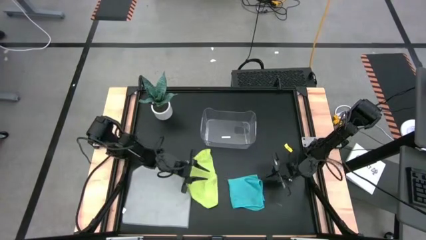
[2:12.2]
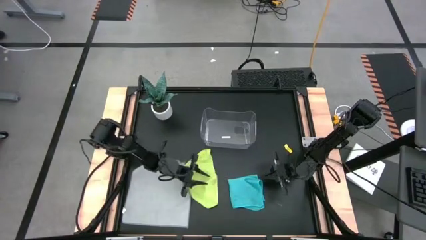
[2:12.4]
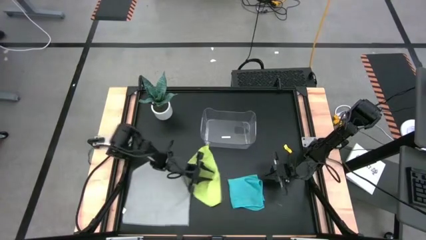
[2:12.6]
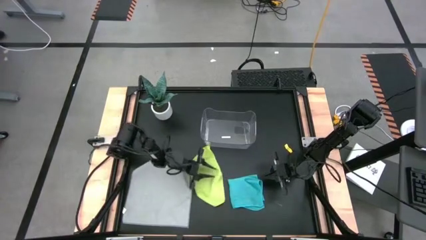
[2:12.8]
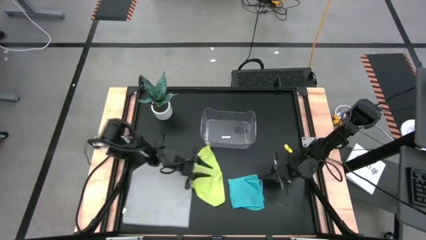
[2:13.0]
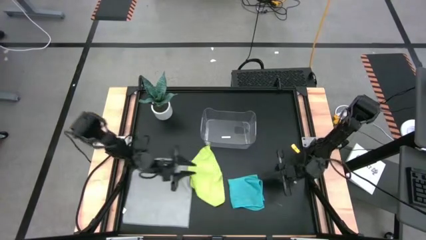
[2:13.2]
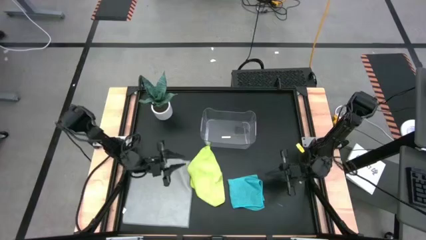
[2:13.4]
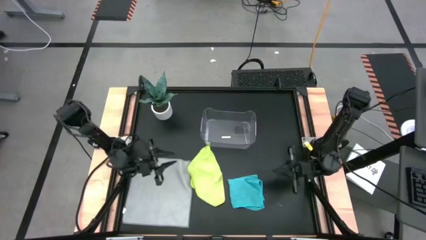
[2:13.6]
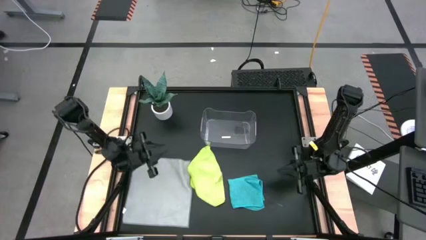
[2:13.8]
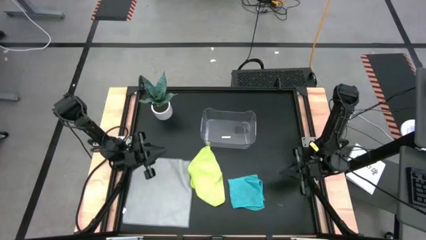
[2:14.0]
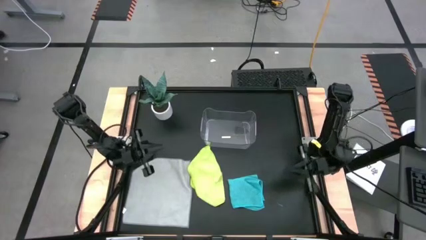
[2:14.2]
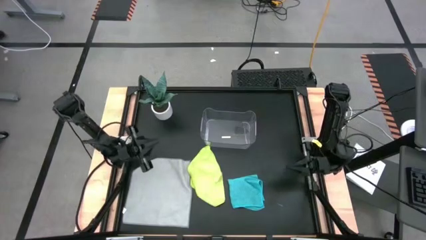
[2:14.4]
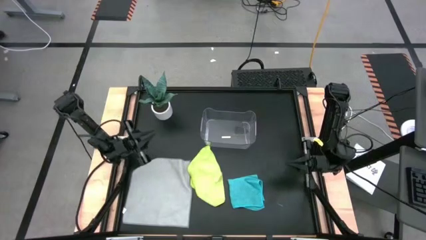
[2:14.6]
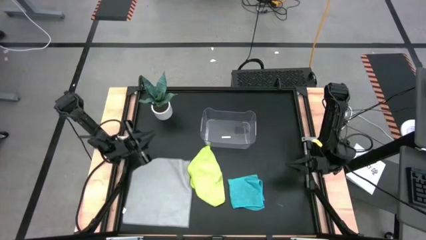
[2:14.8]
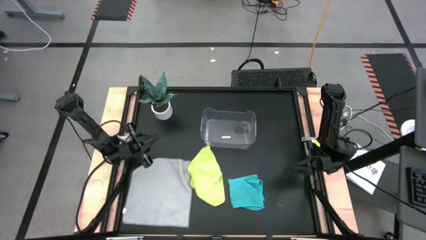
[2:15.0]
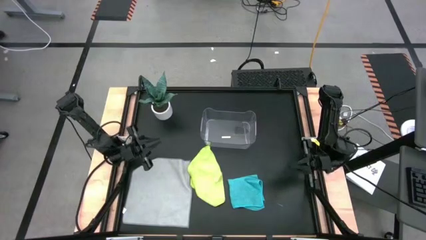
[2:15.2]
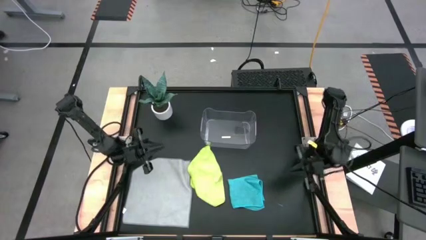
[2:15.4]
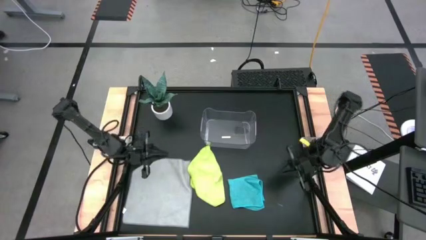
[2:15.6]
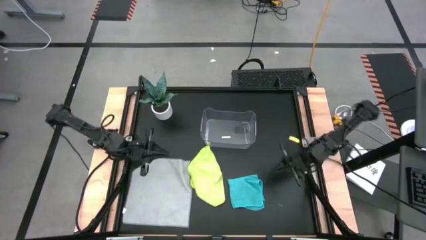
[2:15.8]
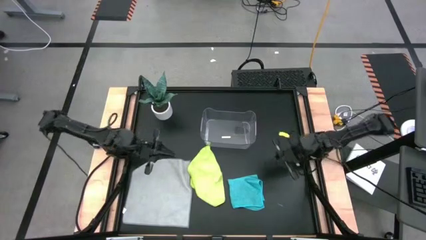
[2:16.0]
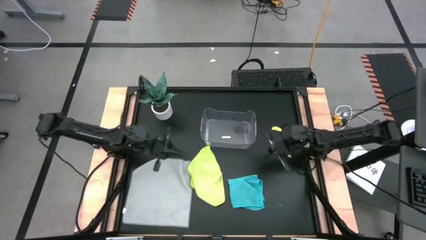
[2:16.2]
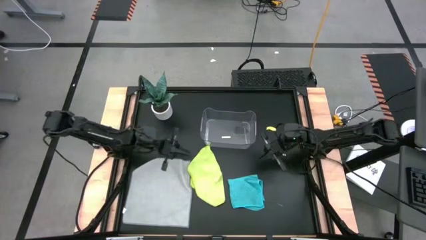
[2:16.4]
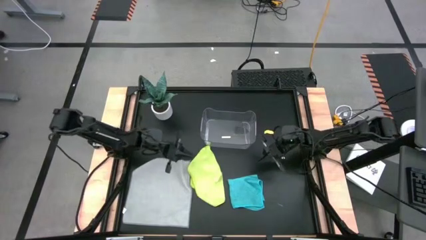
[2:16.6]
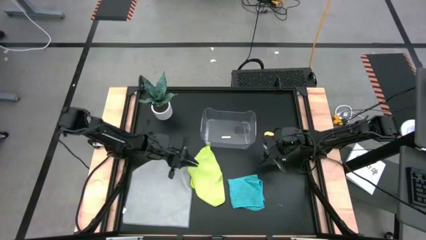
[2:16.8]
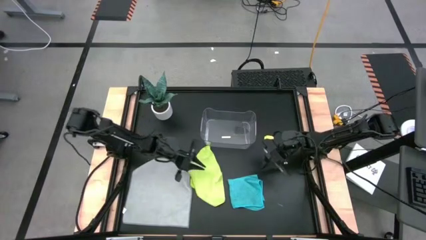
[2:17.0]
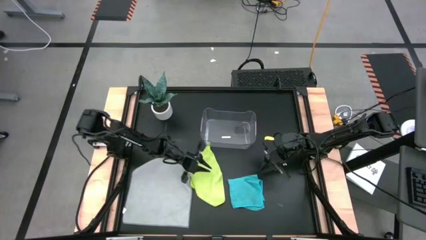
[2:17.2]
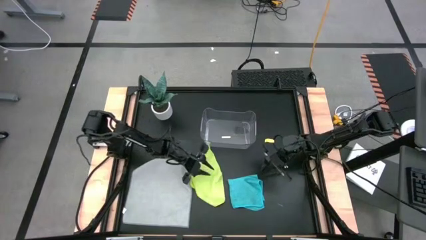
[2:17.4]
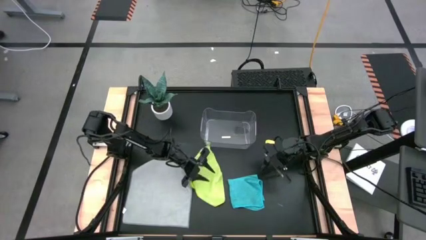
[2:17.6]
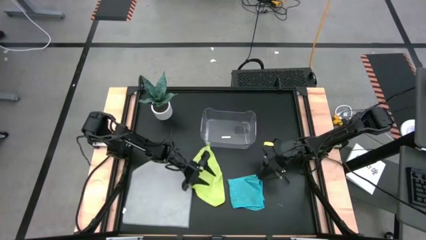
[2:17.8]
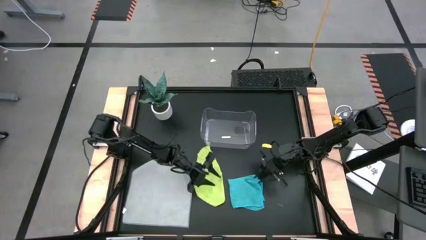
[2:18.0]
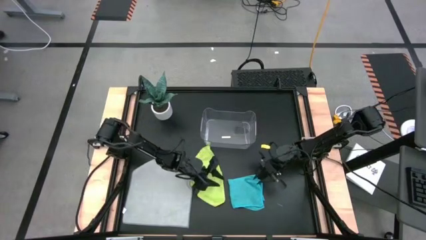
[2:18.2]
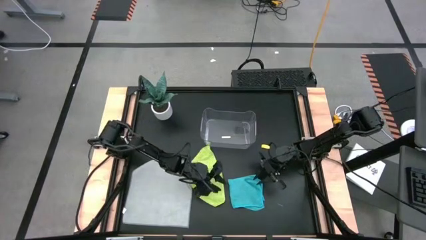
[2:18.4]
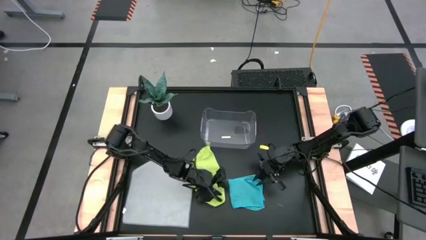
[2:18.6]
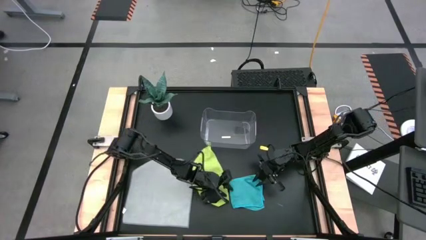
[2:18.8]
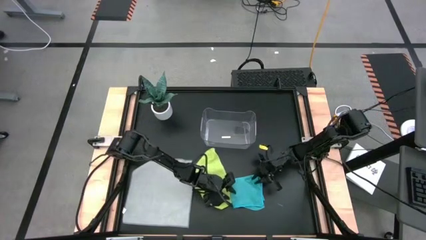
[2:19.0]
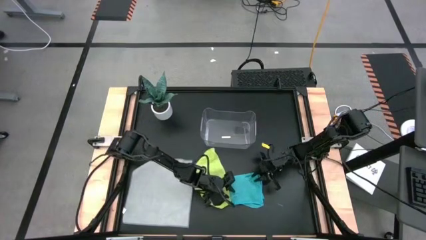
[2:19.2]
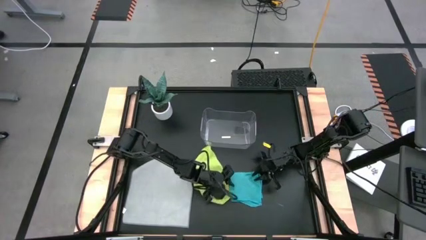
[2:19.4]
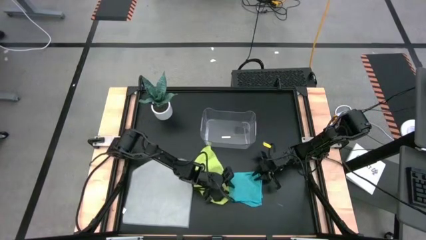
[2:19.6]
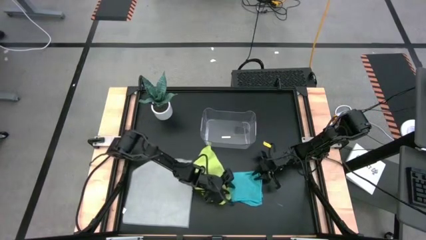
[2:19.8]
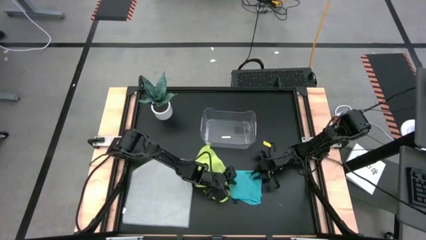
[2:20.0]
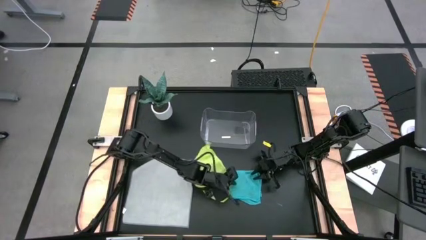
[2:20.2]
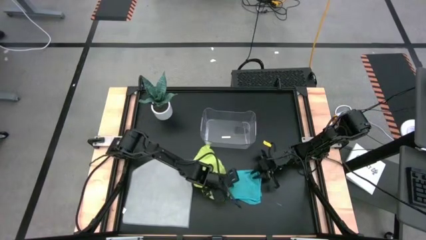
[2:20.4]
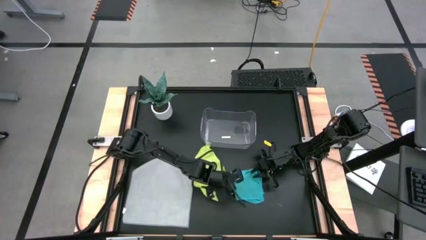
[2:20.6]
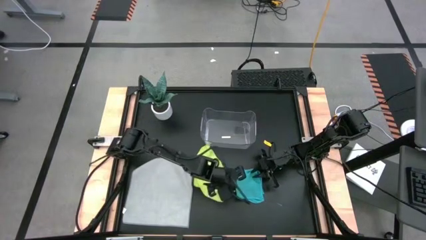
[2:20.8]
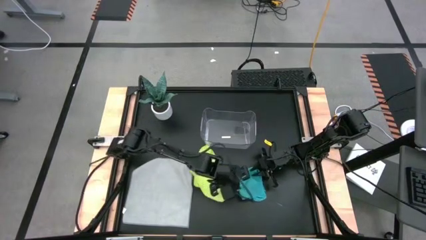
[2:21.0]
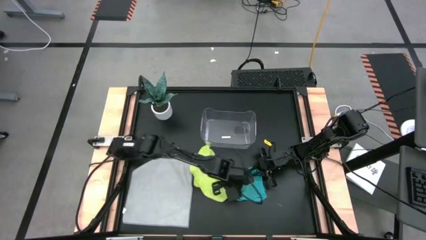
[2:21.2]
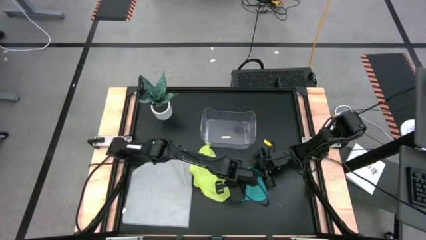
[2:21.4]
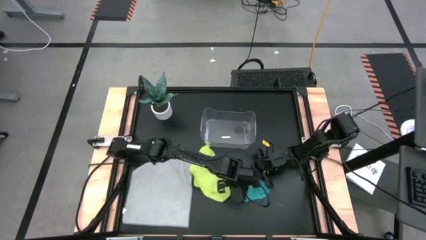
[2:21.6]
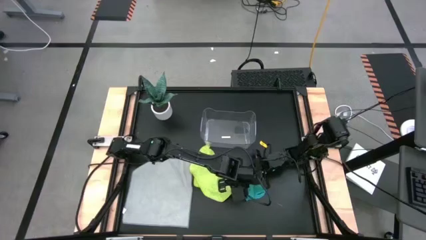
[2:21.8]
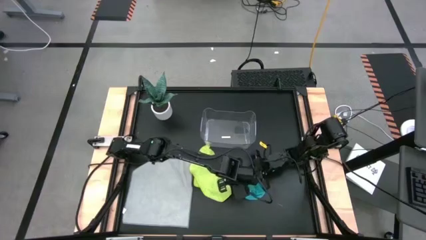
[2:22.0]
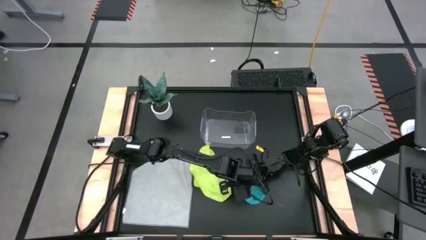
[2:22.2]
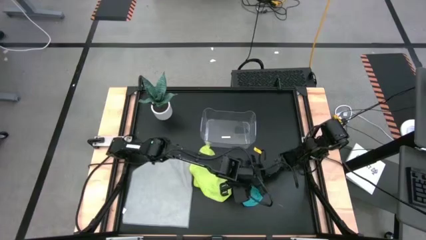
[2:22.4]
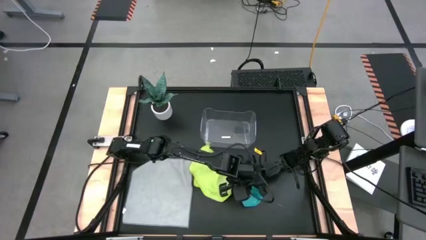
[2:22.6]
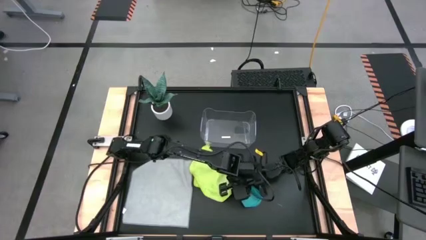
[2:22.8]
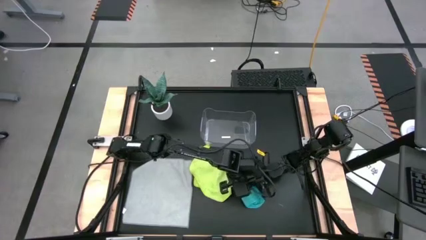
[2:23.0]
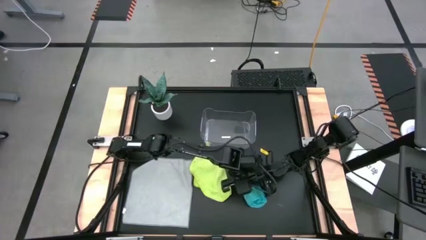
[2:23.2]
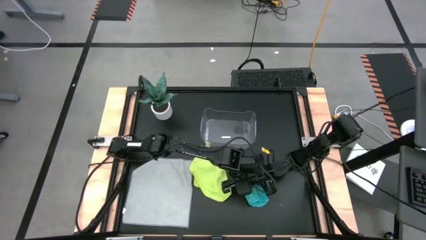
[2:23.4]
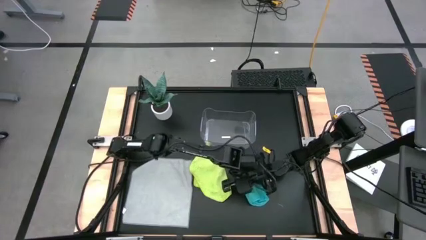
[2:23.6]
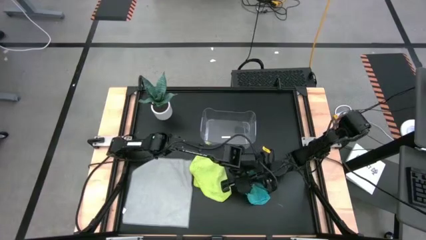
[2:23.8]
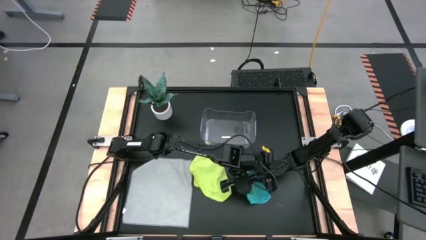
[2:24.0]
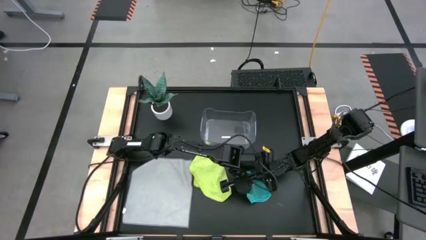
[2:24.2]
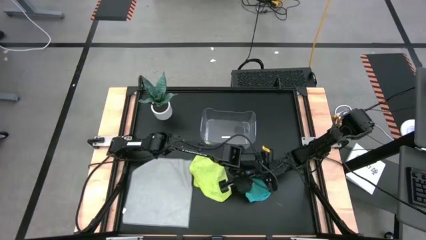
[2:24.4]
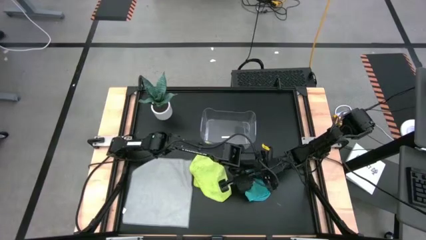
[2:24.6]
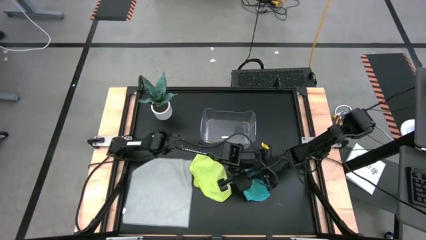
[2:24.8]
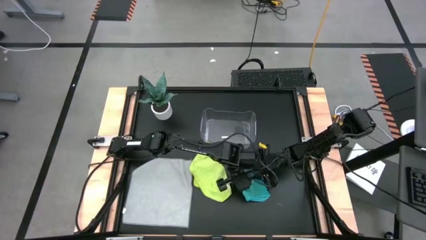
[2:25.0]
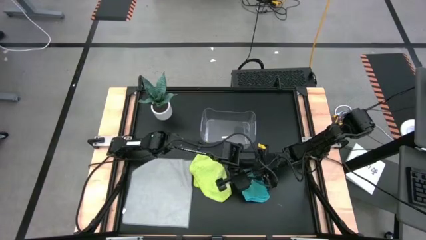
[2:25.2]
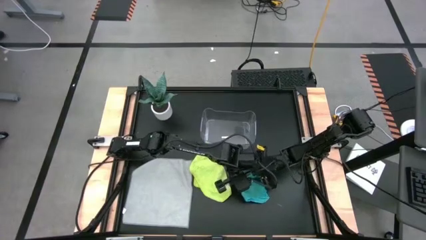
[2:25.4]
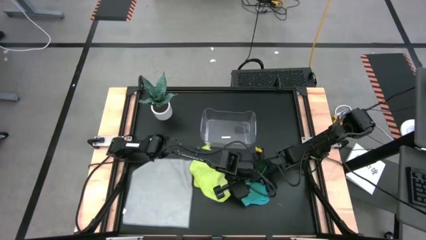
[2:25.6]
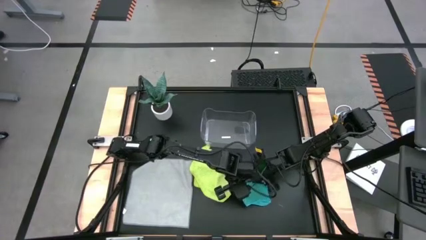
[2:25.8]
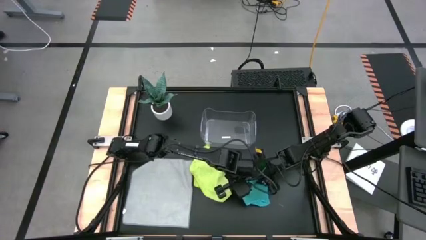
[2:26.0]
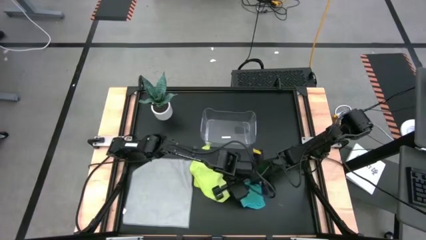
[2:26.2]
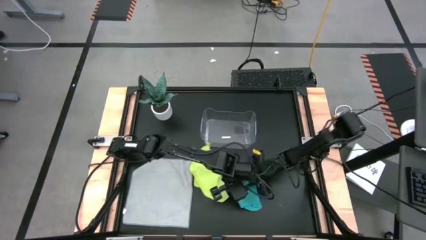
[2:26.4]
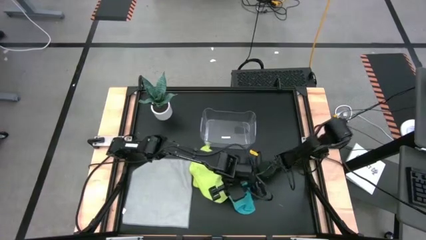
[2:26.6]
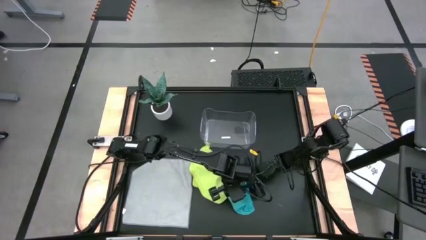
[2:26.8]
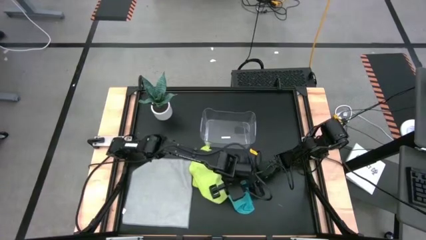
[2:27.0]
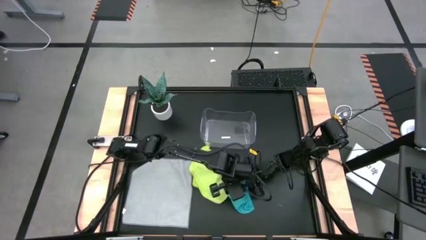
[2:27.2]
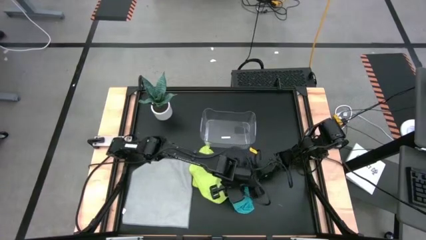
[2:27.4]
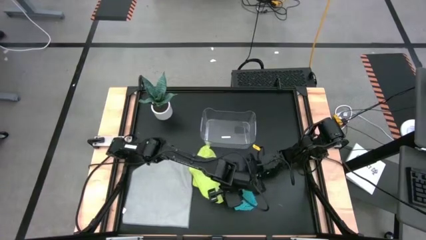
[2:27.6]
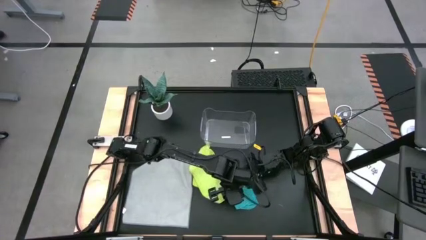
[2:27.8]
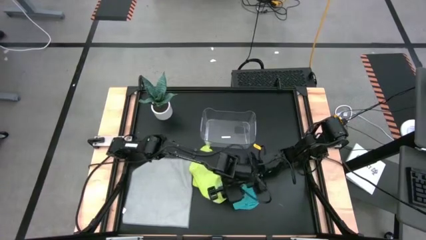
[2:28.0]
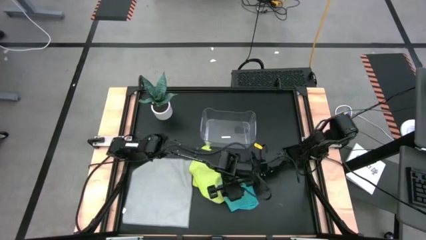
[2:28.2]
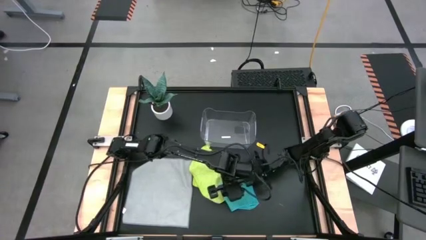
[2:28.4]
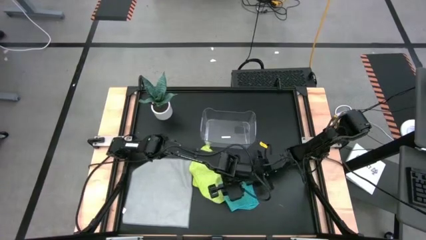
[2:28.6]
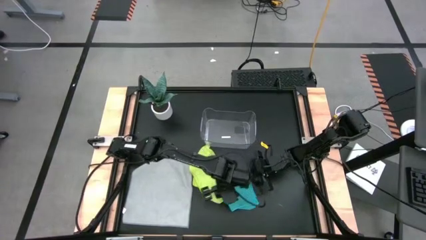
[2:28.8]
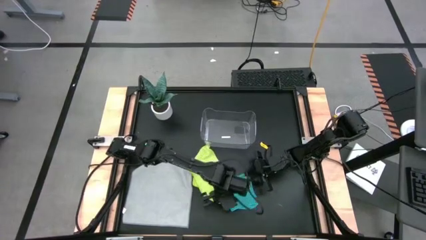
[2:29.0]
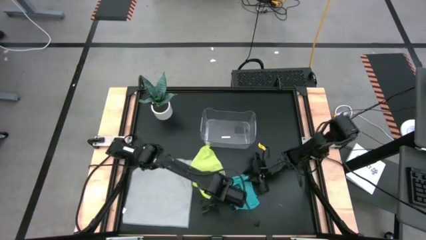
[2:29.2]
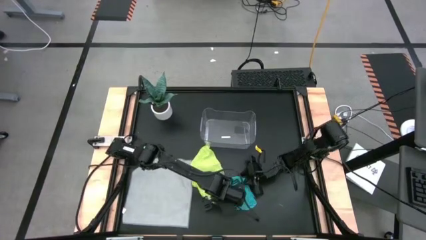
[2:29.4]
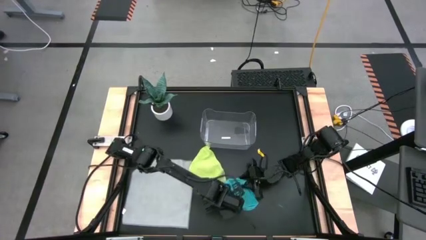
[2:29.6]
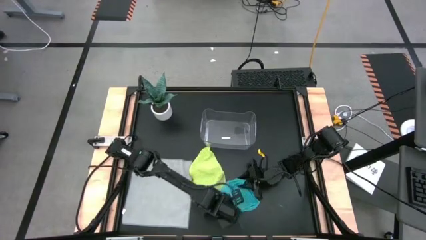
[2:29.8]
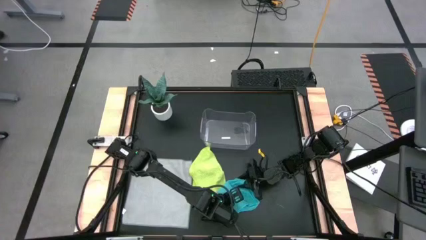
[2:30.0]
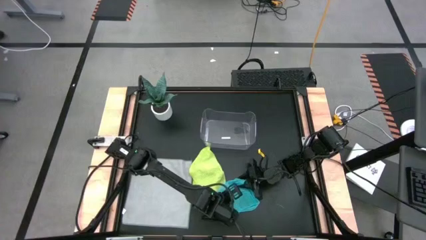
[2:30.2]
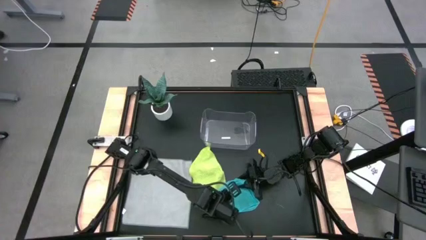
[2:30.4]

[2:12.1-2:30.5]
Task: Fold microfiber towels
Fold the blue towel
